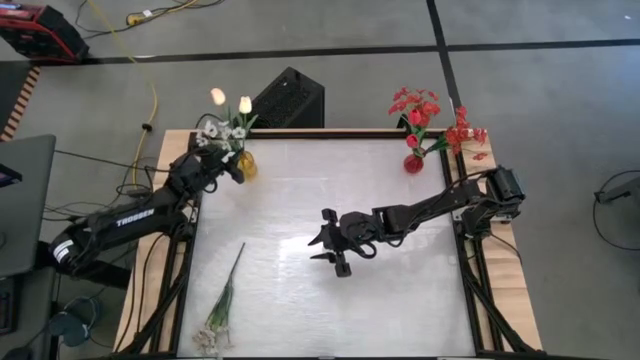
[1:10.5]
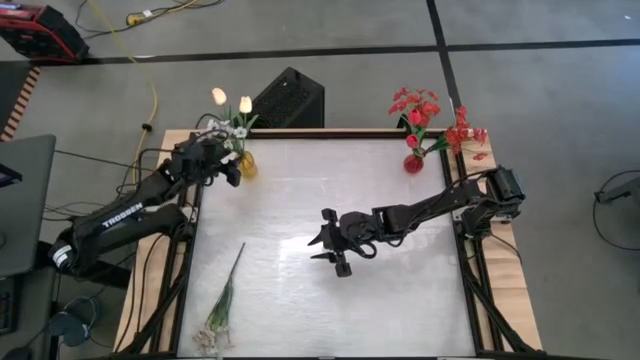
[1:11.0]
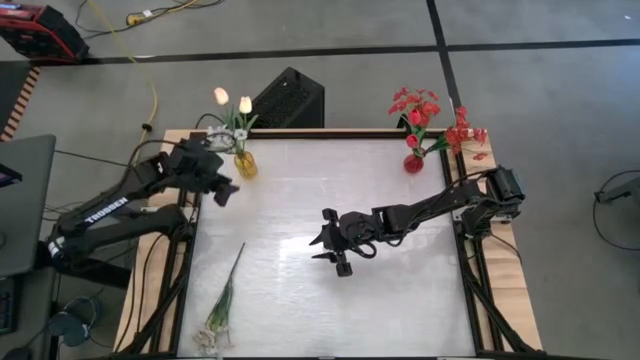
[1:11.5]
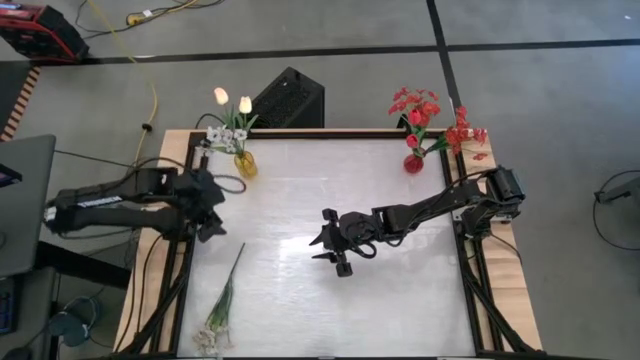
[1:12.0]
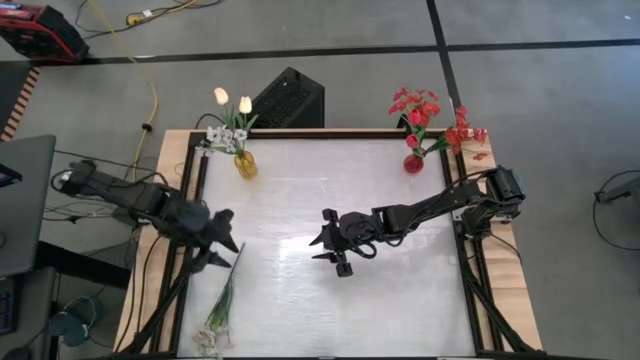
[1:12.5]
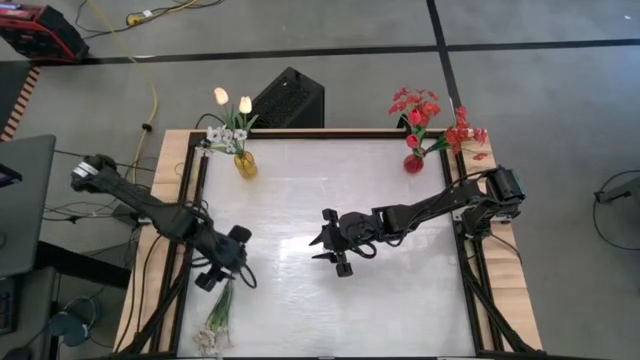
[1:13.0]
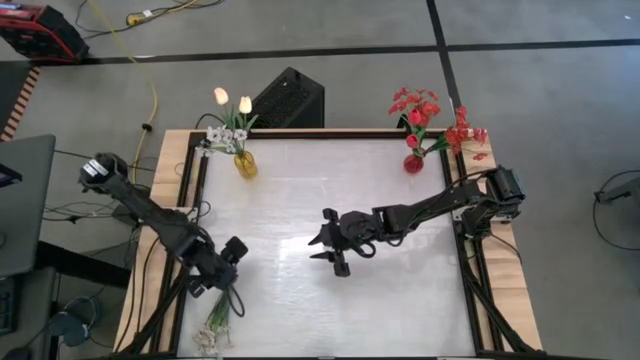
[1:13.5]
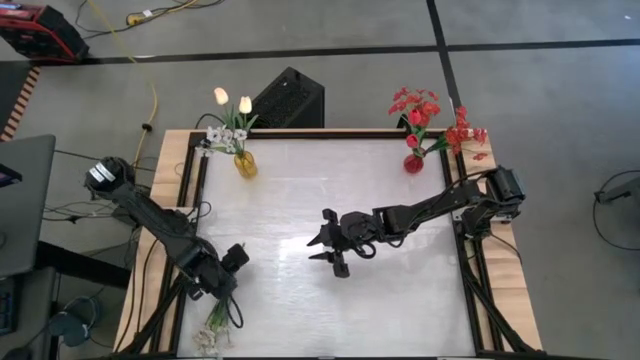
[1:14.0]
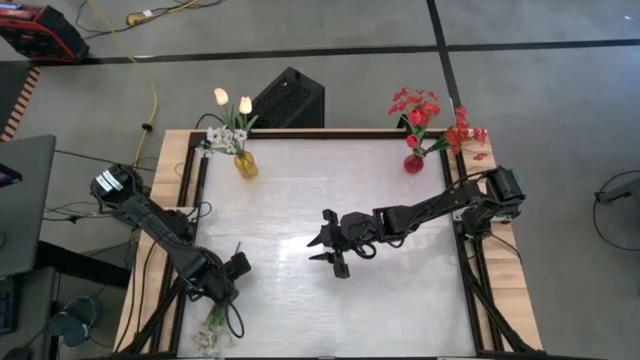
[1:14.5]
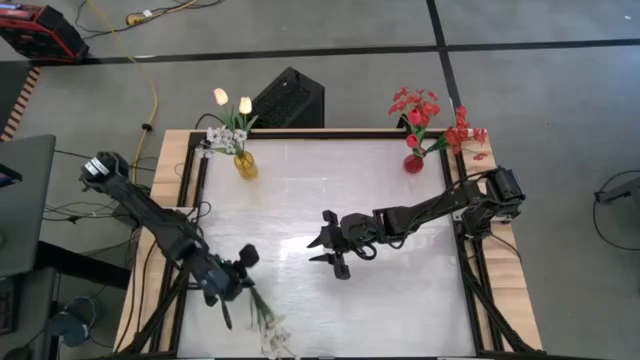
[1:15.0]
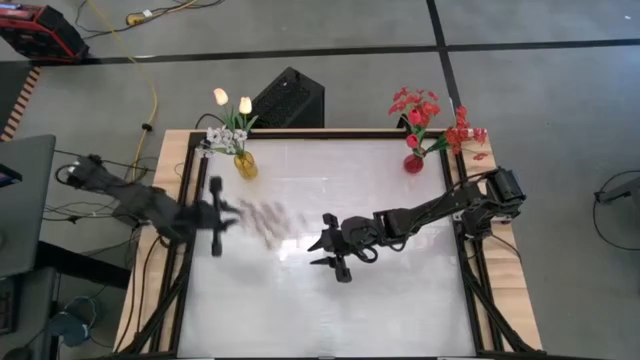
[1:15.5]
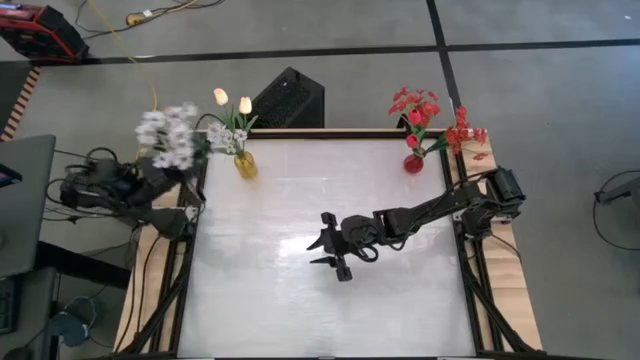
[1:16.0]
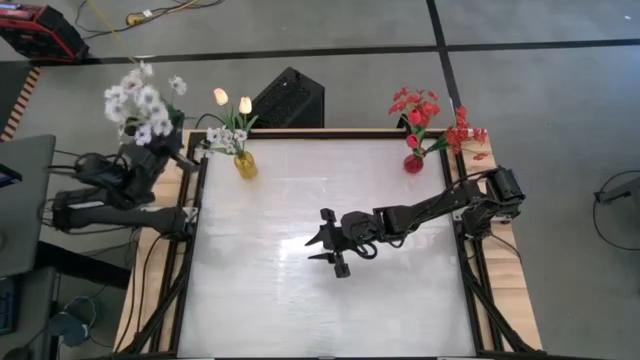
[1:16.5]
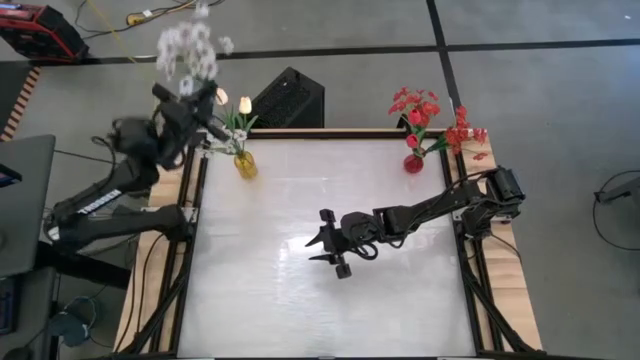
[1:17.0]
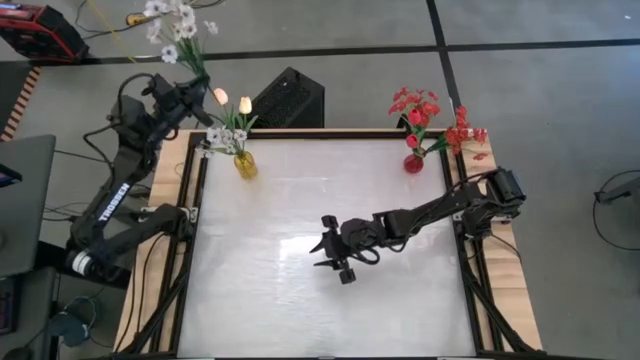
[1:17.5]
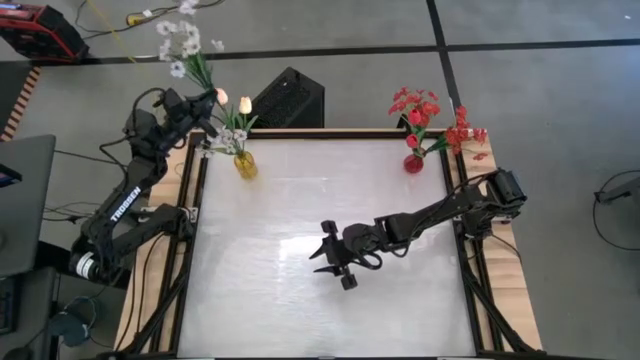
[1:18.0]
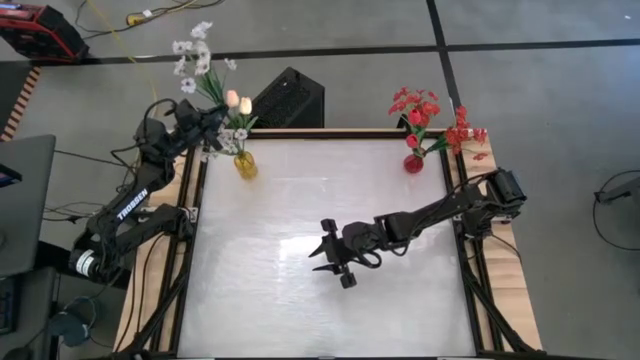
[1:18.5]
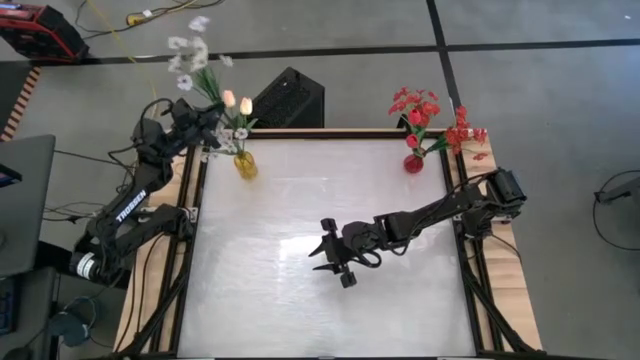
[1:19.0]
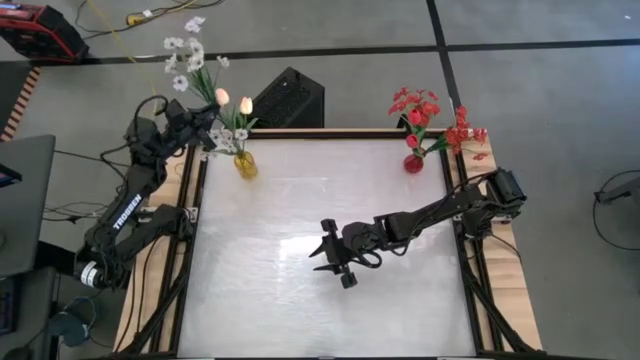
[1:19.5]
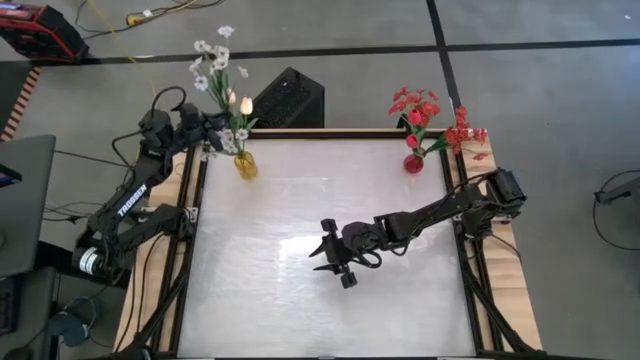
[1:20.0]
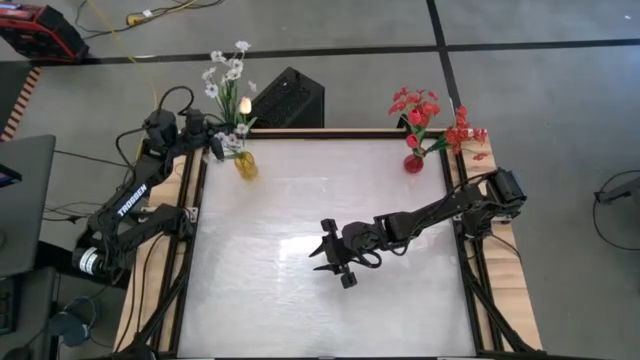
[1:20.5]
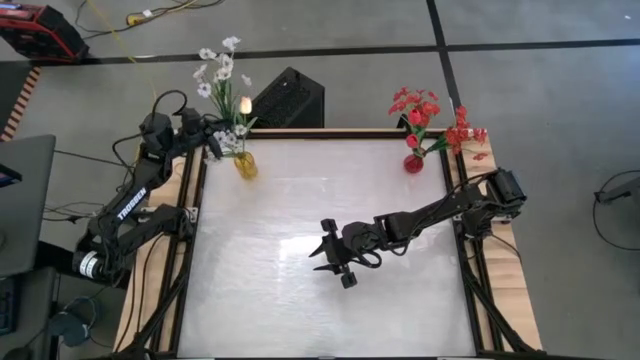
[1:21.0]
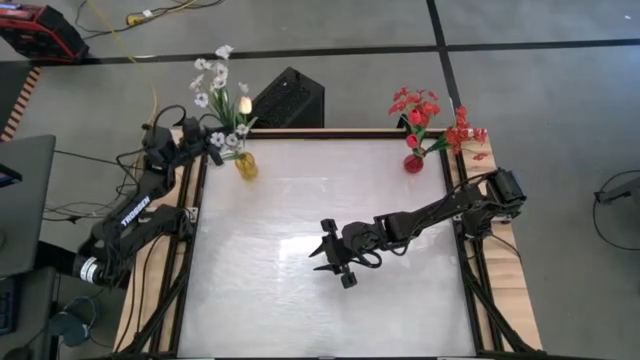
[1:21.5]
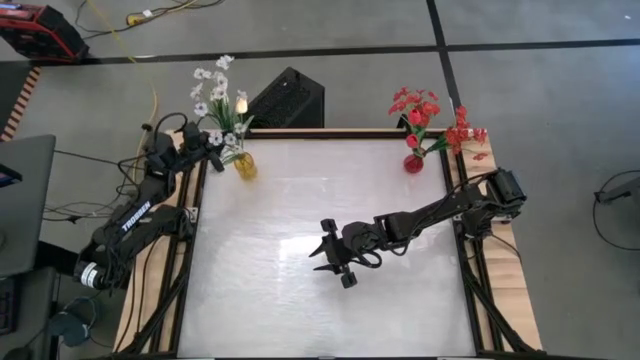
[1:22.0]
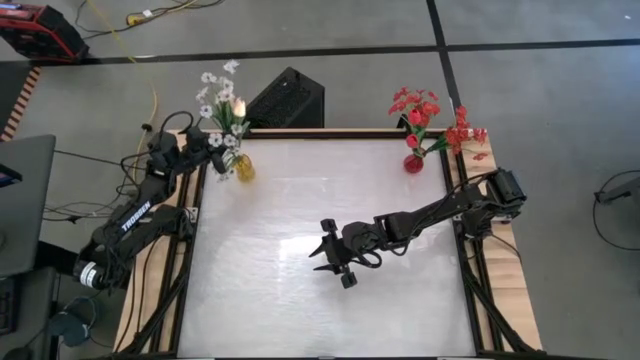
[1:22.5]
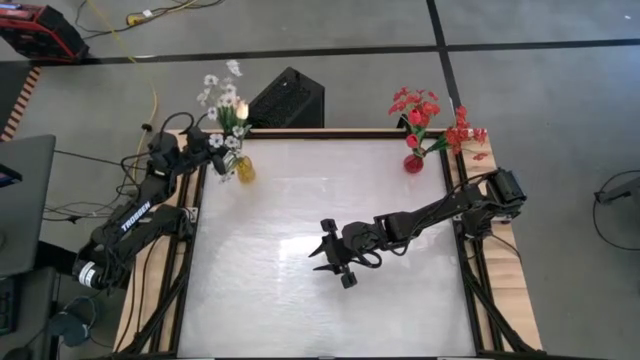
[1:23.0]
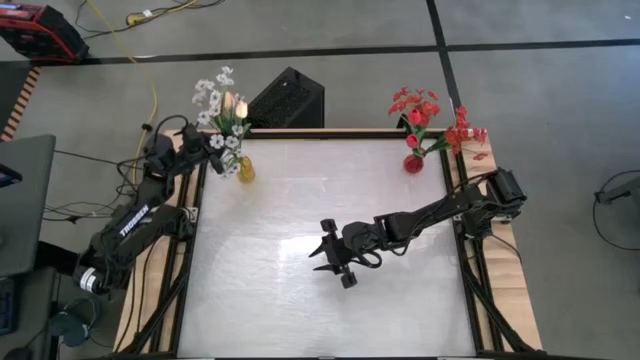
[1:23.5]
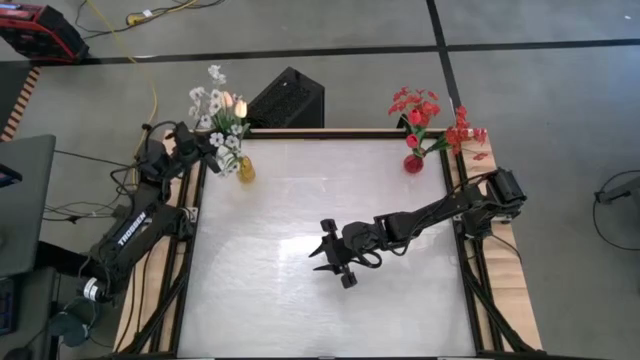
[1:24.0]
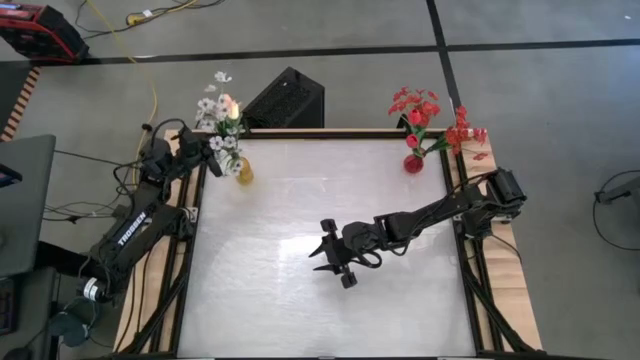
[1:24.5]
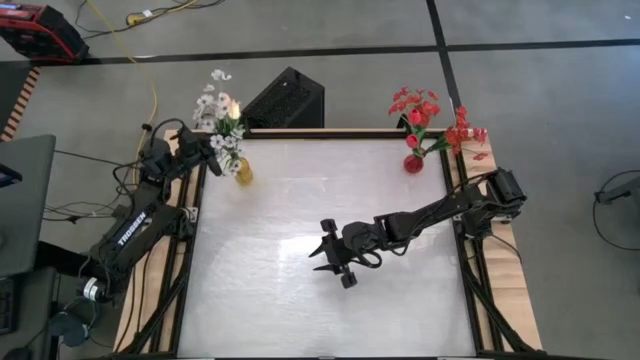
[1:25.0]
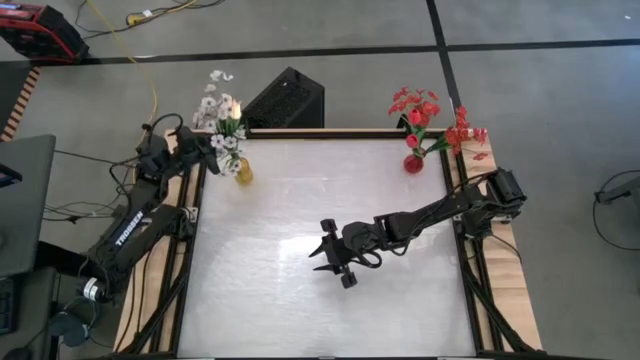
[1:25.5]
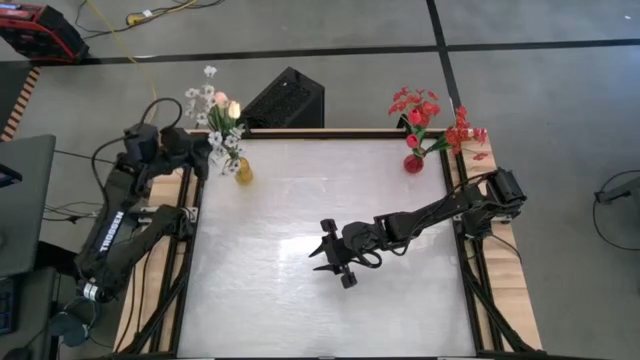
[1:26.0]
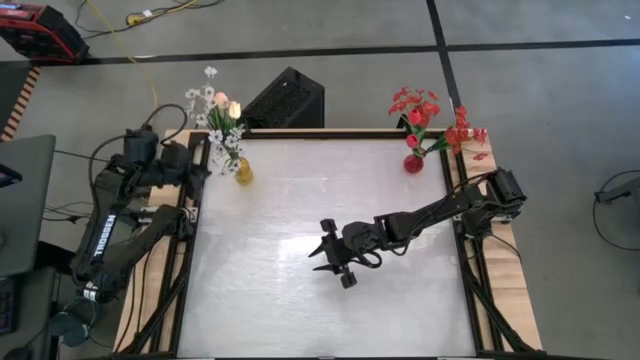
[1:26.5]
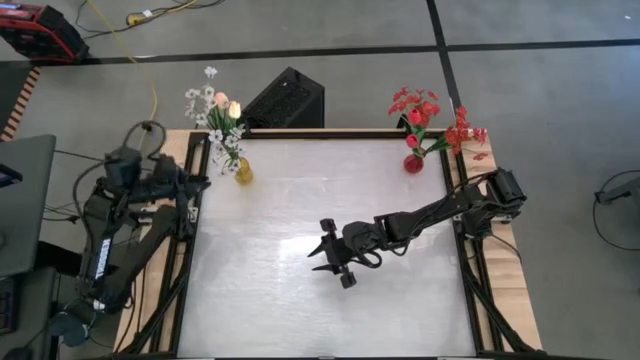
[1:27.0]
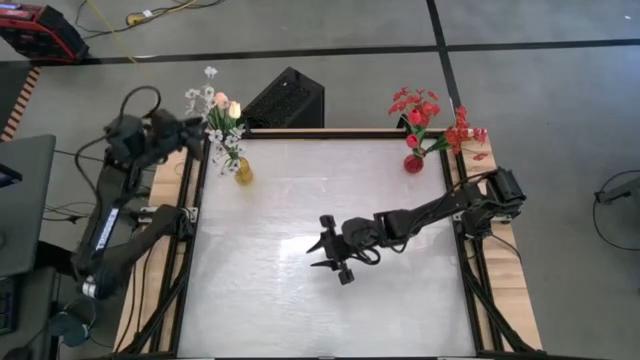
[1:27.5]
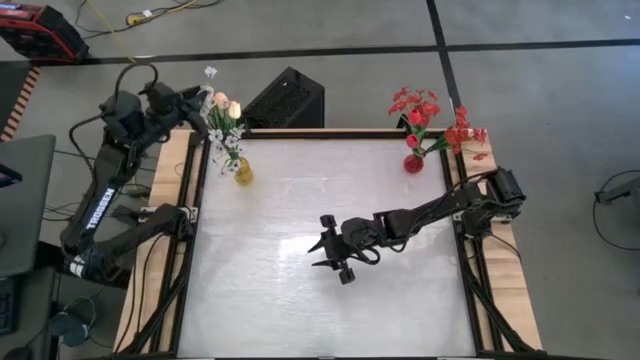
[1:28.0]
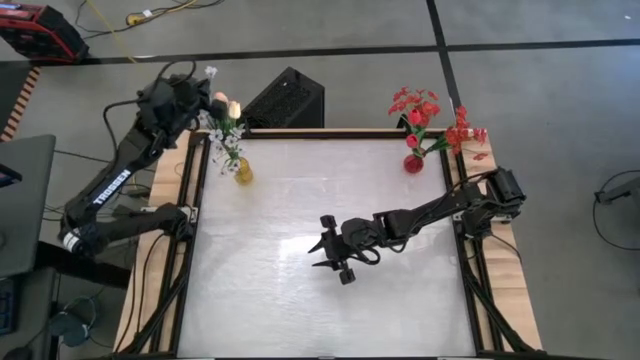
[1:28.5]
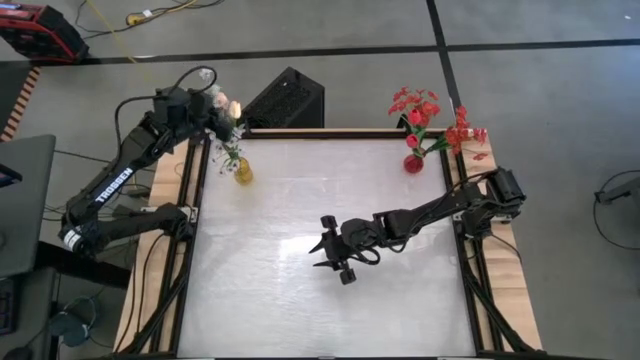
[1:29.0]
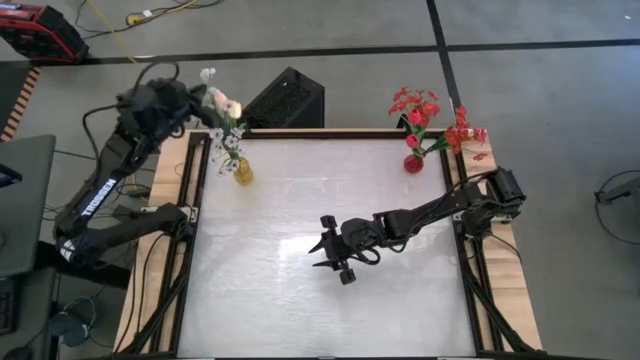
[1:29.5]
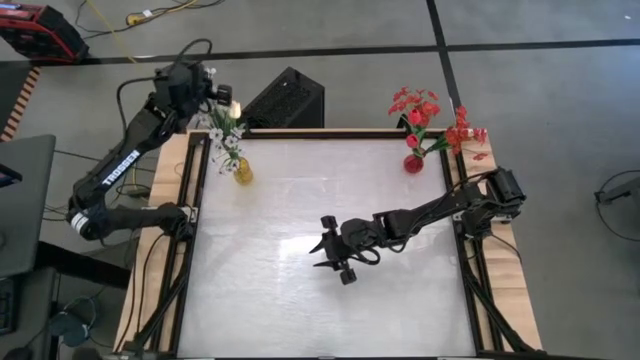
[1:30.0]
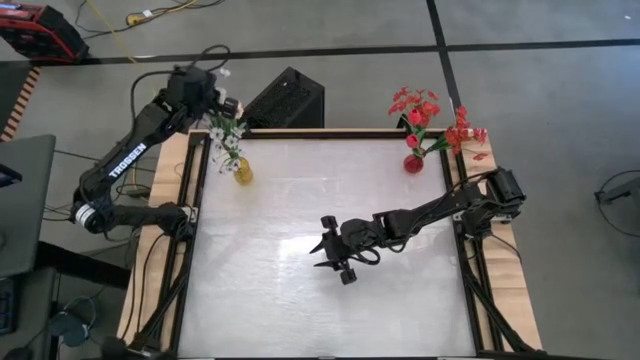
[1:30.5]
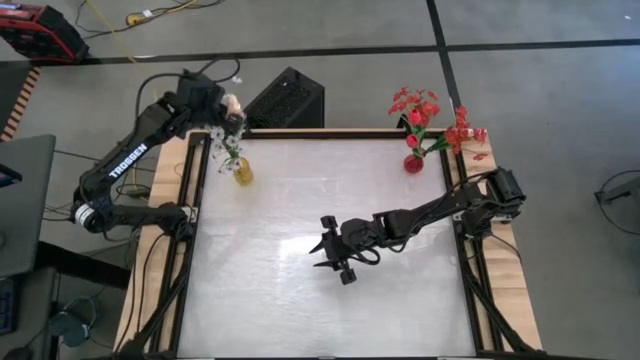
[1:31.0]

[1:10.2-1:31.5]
Task: Sort flowers into vase by color
Put the white flowers in the yellow vase
